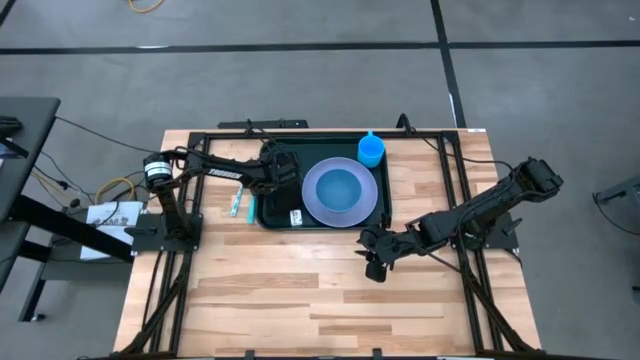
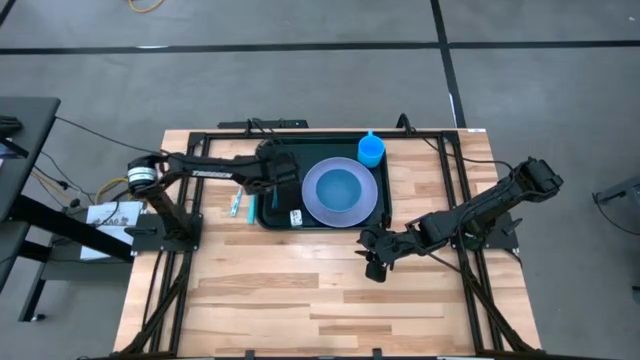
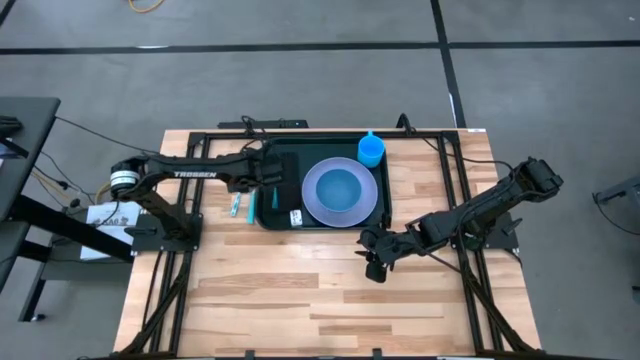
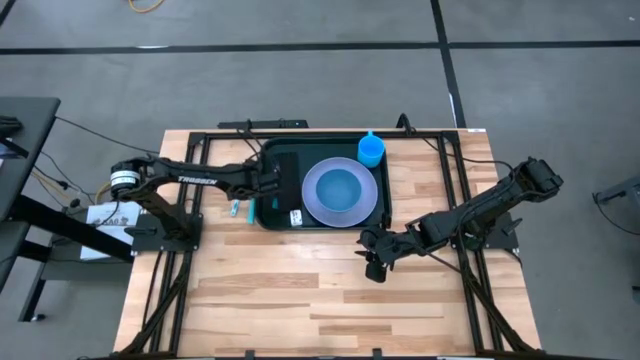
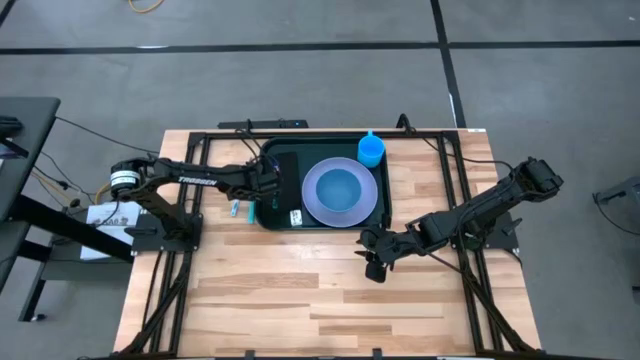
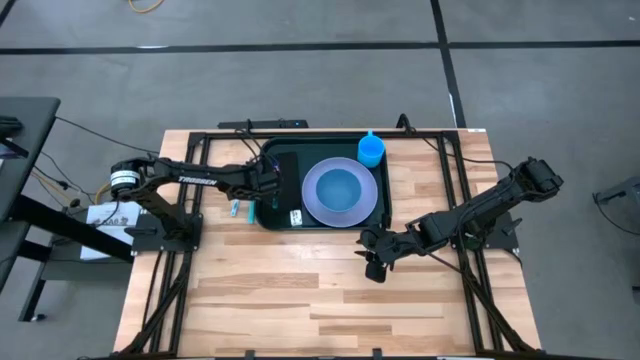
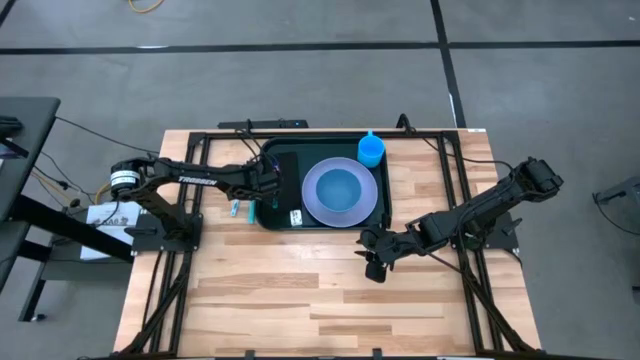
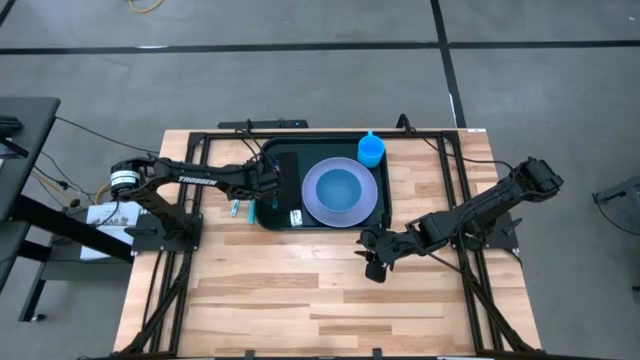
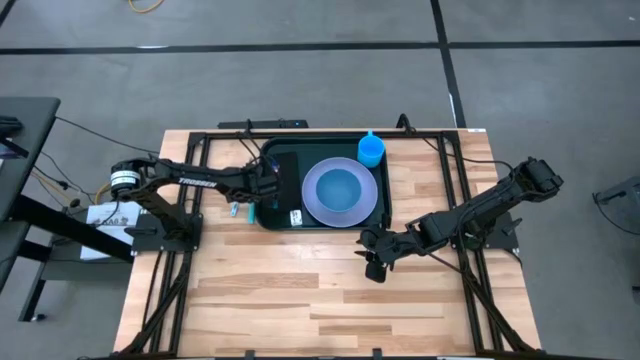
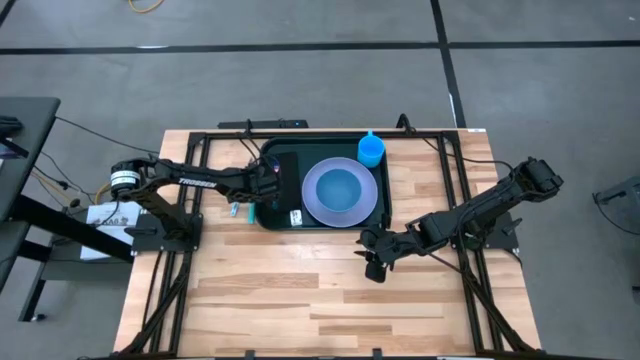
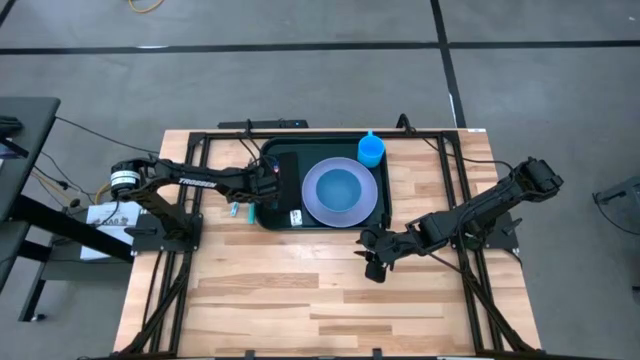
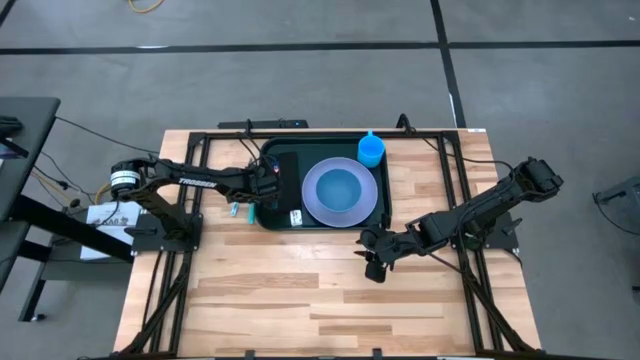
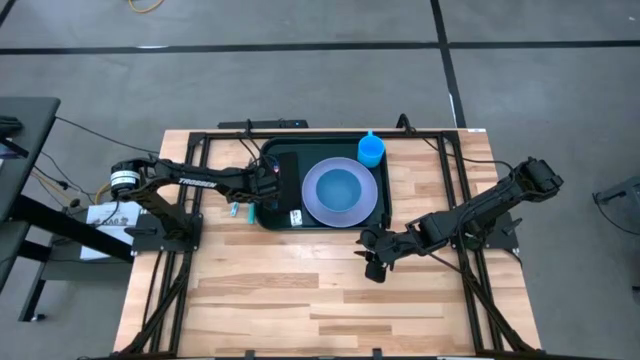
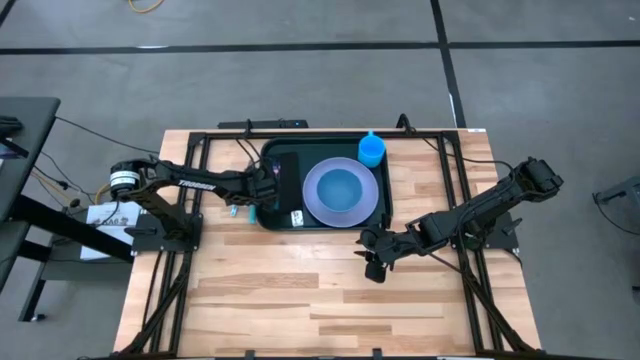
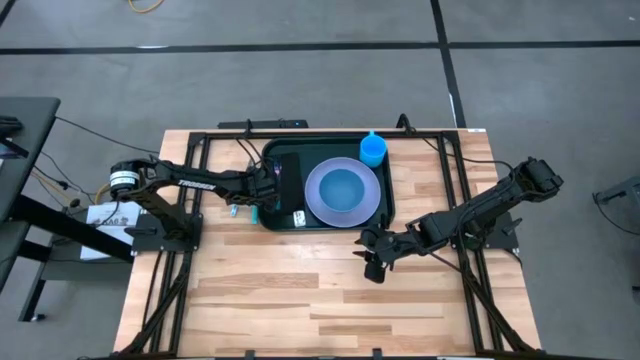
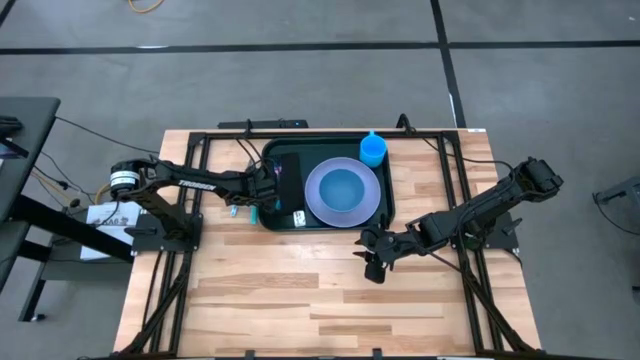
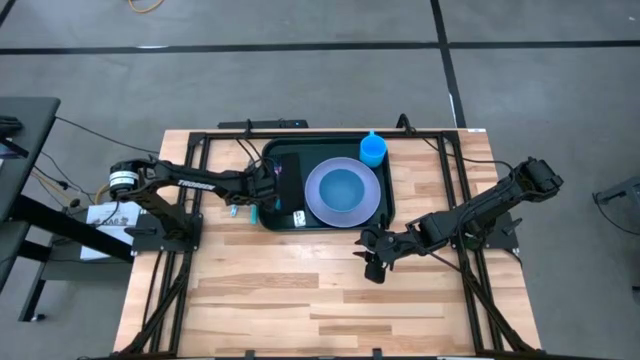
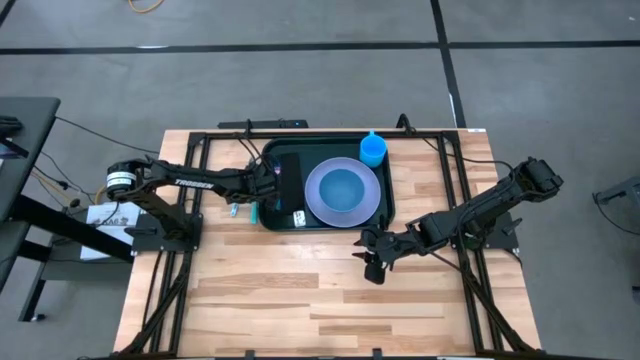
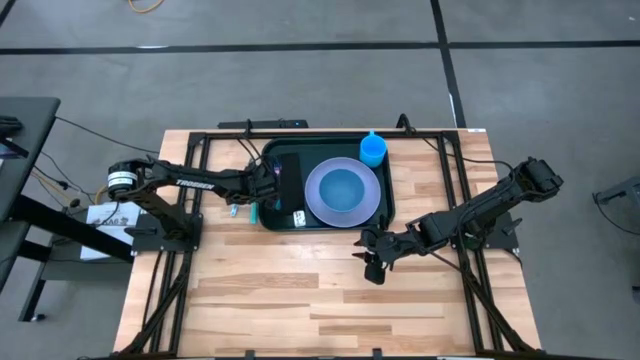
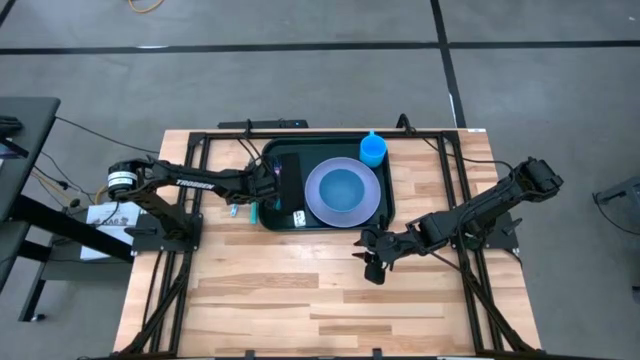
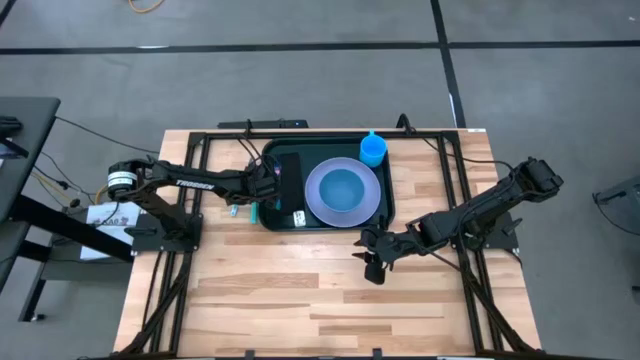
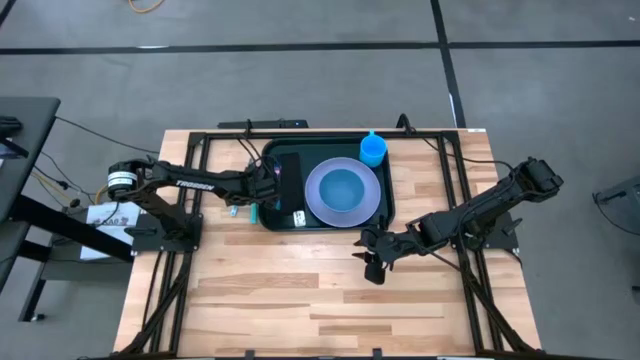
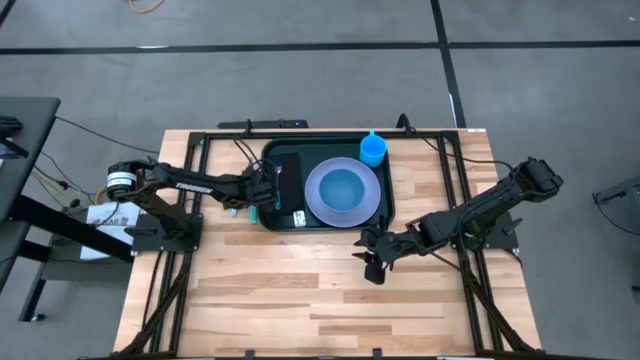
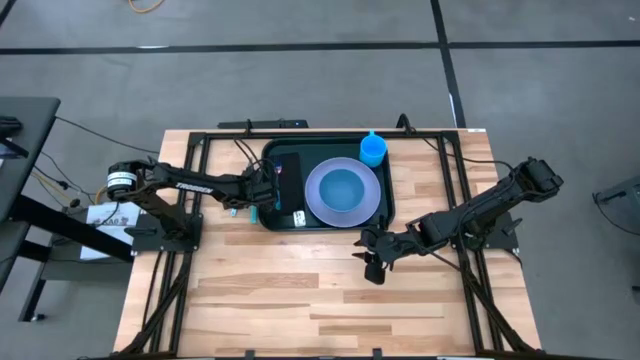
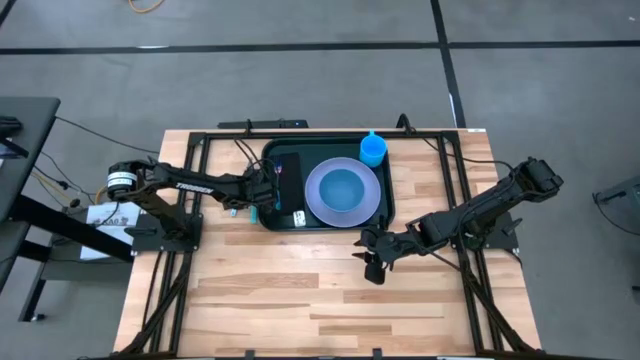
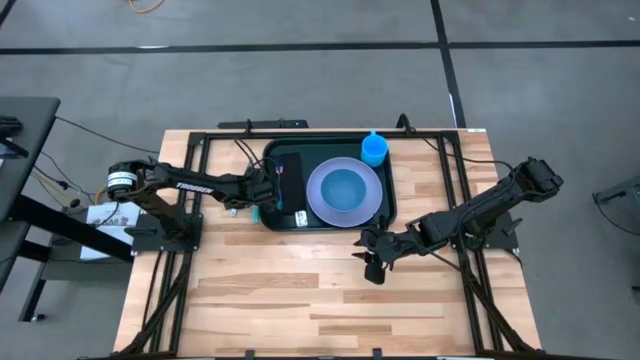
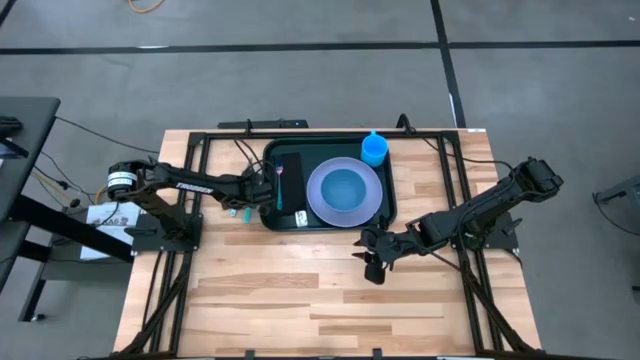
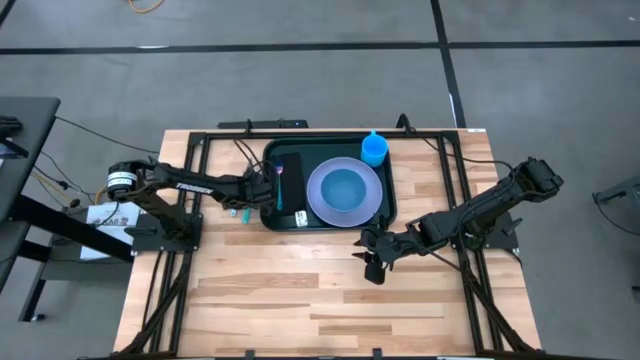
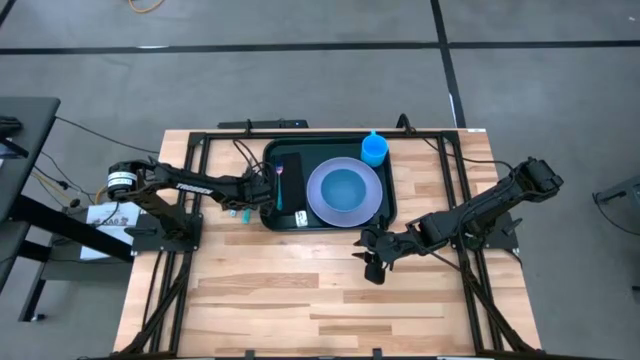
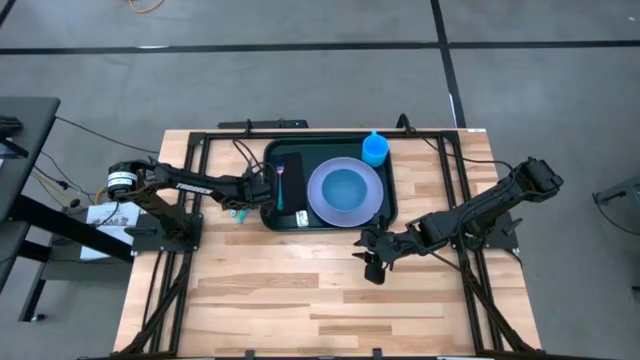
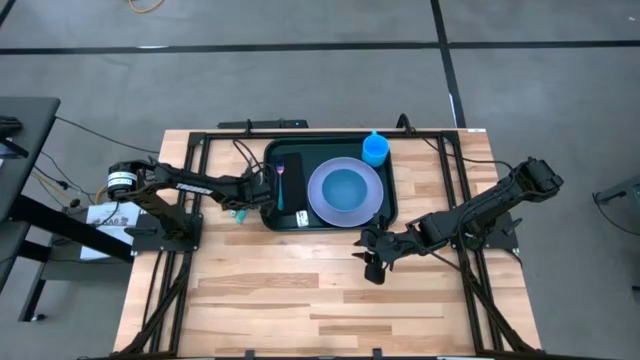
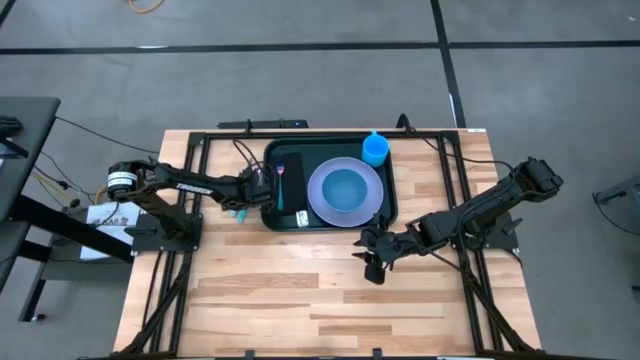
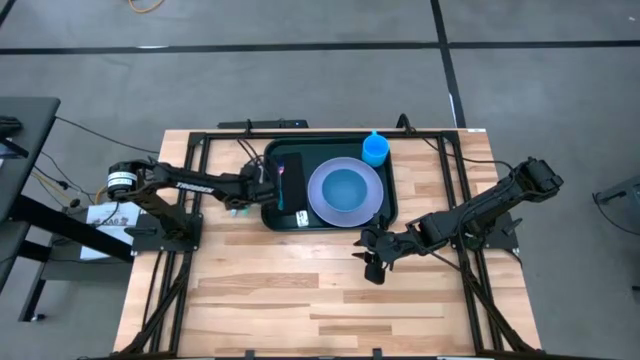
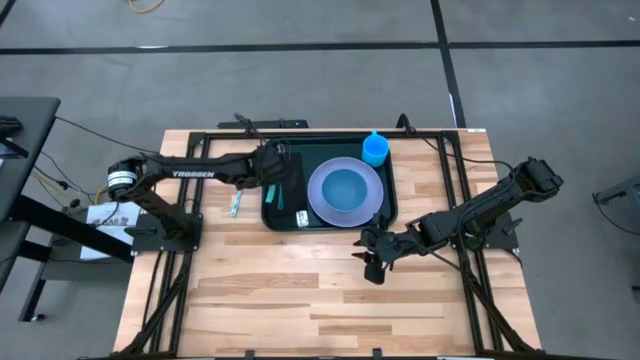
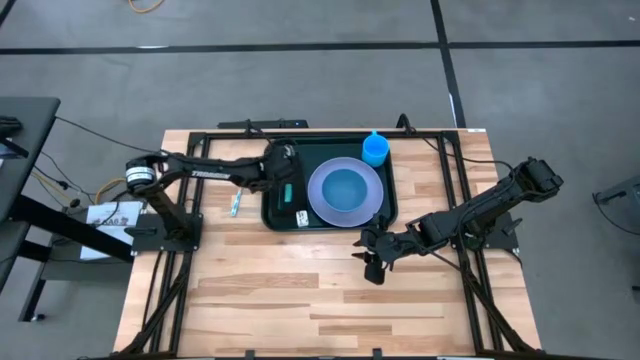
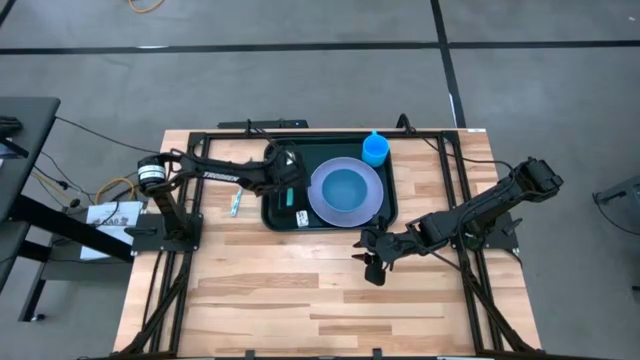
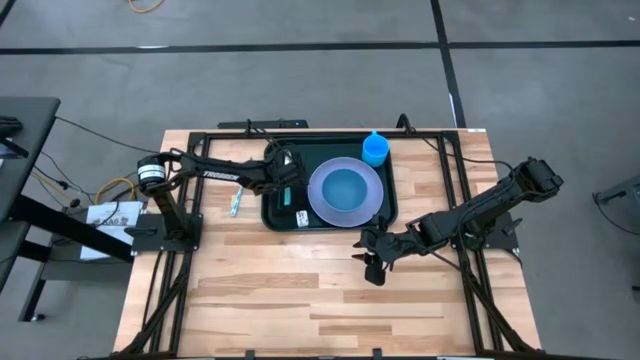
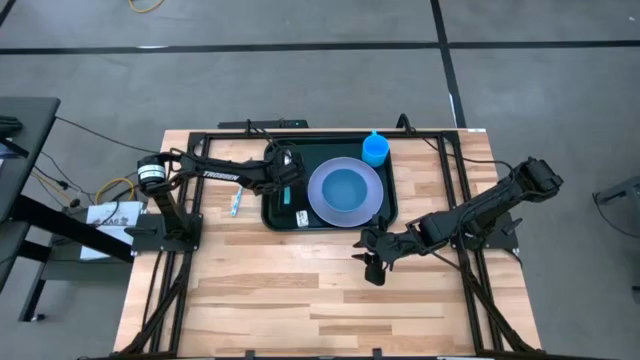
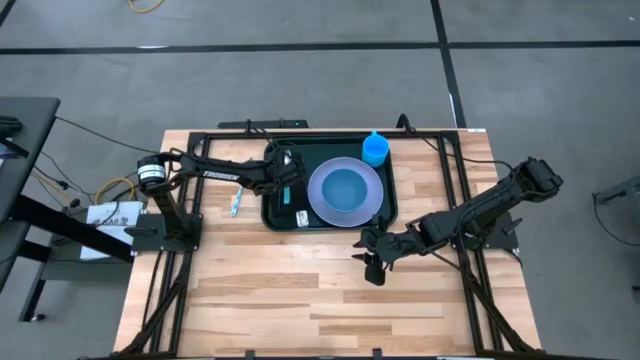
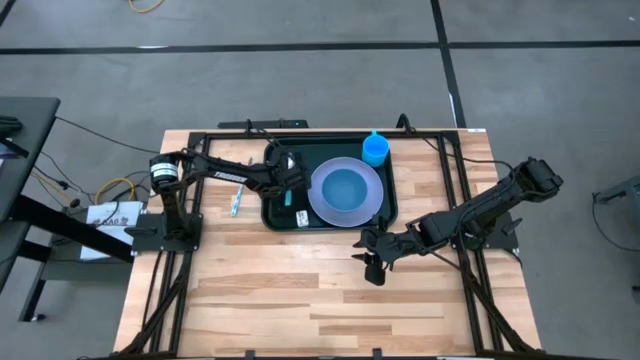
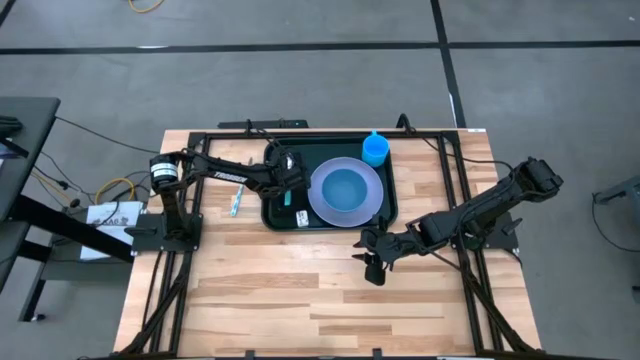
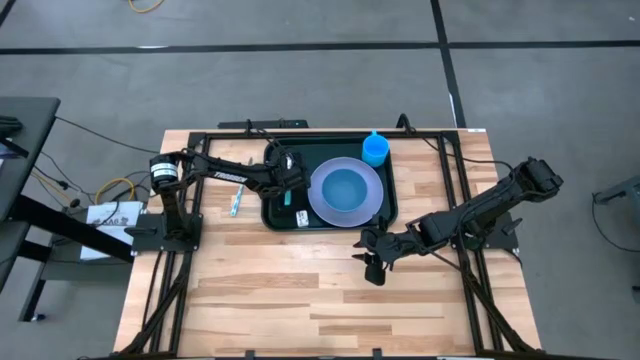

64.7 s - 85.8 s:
Task: Set up tray
Put the light blue spoon on the black napkin to the right of the blue fork
